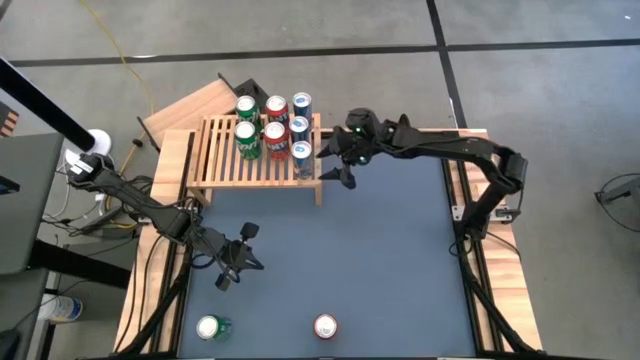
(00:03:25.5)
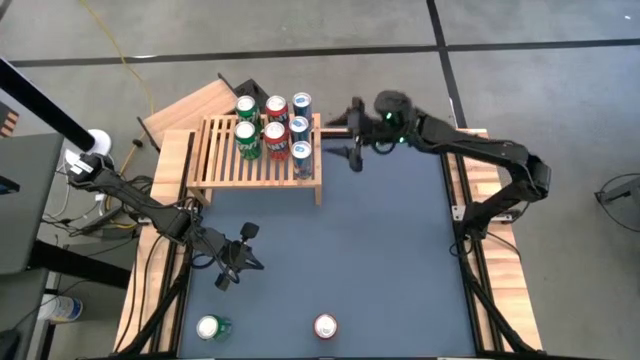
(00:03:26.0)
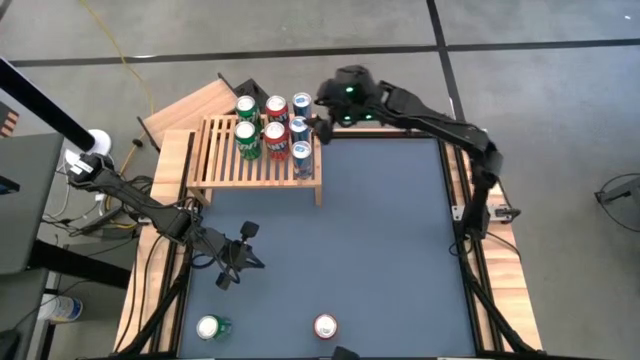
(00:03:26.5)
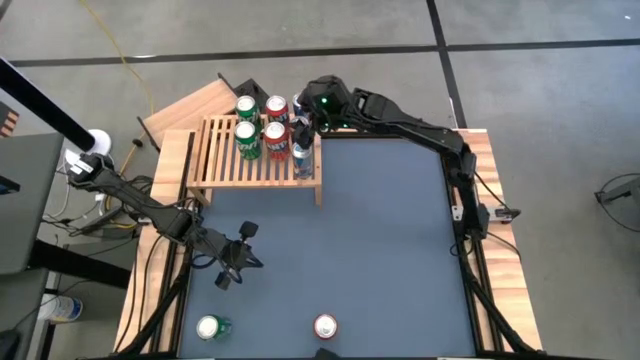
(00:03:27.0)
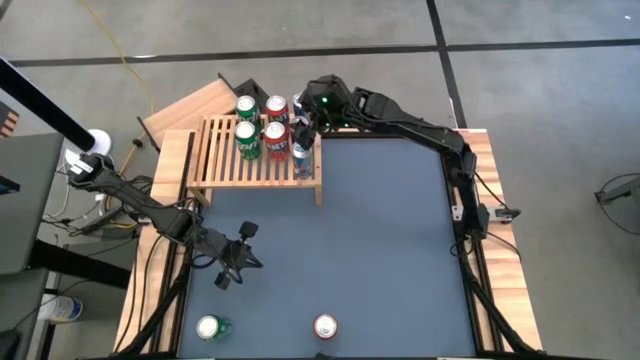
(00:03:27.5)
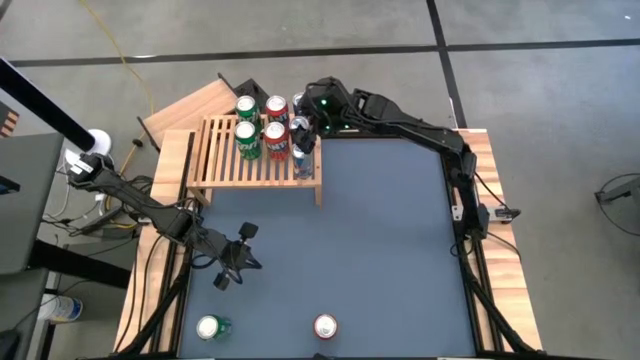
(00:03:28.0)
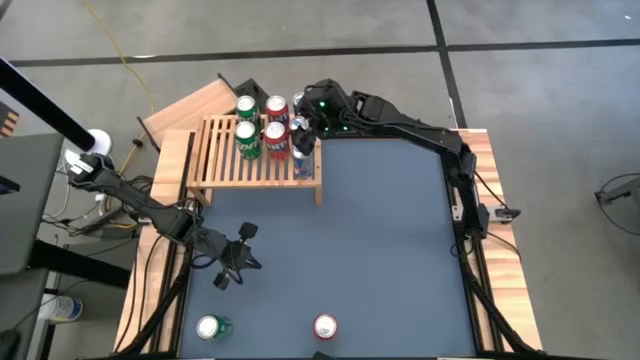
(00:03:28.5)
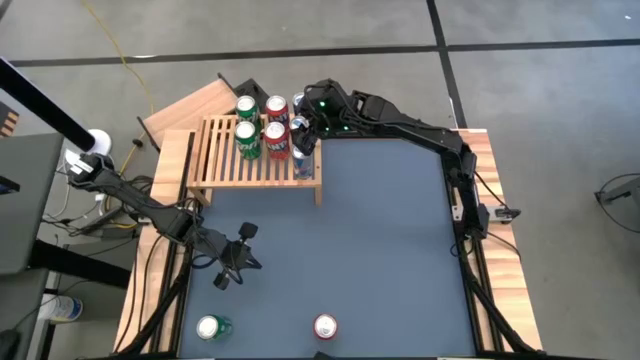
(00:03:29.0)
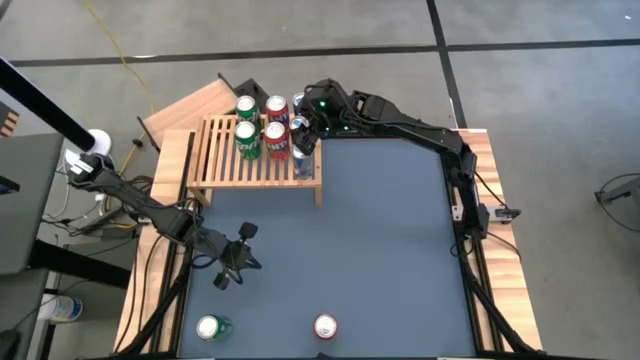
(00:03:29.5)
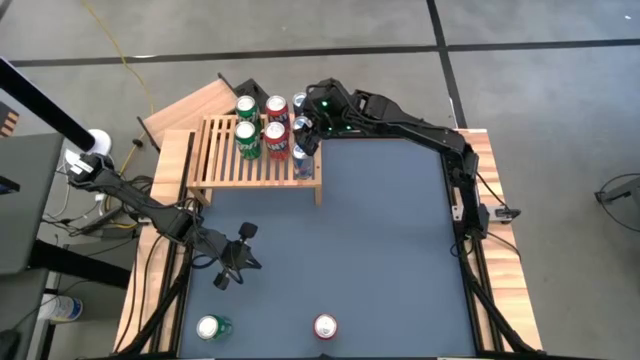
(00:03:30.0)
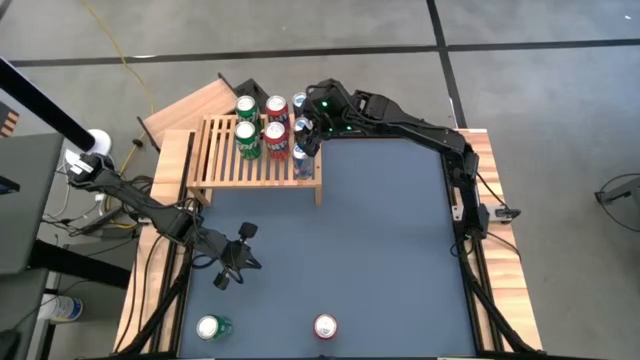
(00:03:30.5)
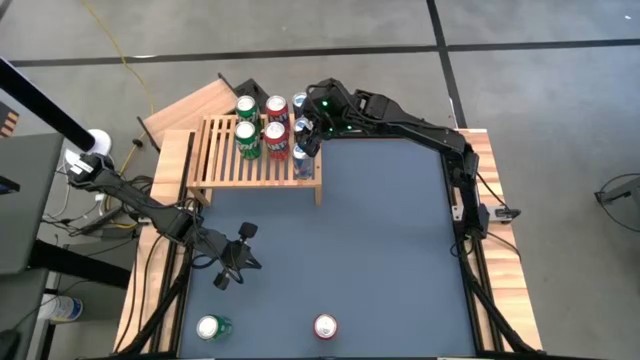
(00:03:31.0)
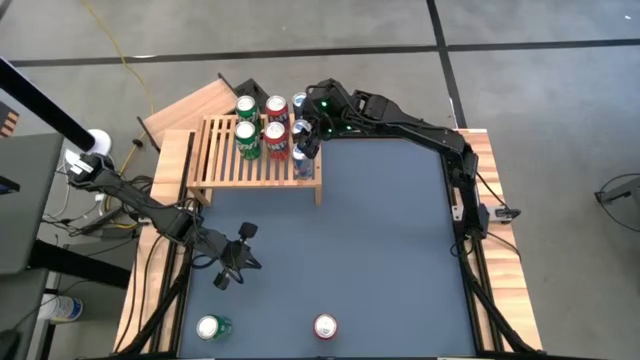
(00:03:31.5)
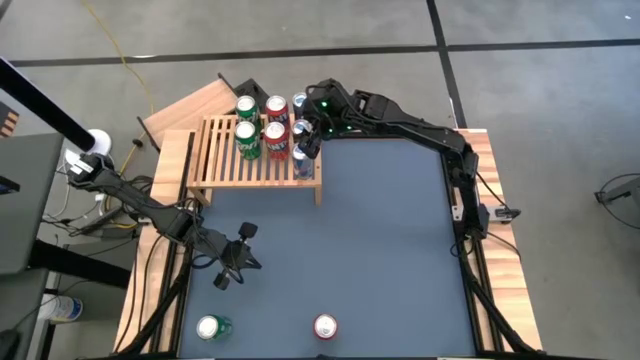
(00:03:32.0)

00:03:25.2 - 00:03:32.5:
Task: Place canned beverage on shelf
Adjust the blue soda can on the shelf

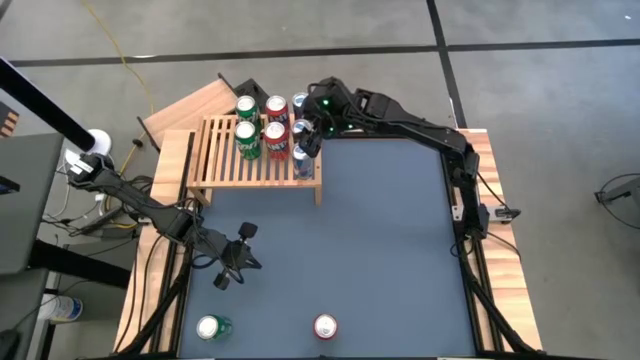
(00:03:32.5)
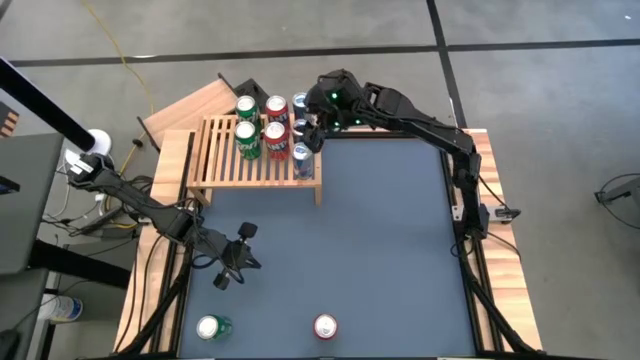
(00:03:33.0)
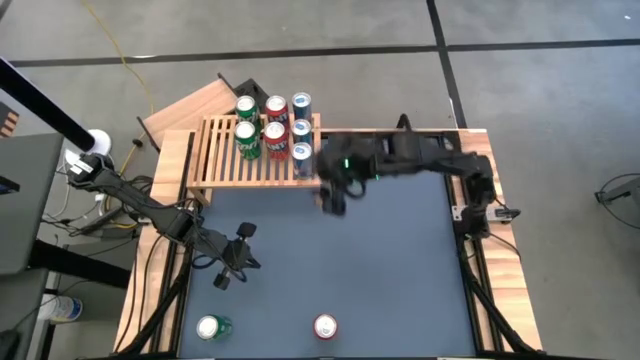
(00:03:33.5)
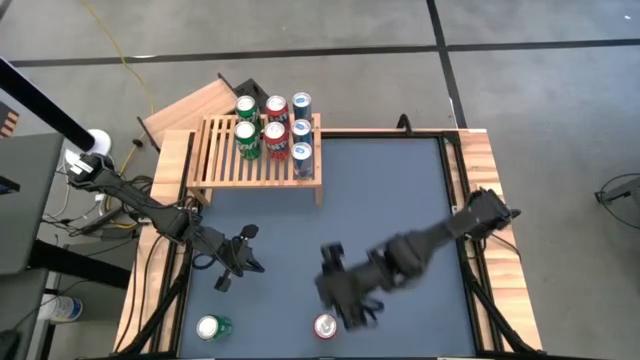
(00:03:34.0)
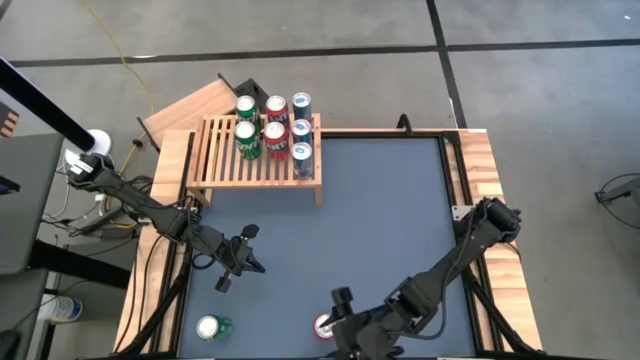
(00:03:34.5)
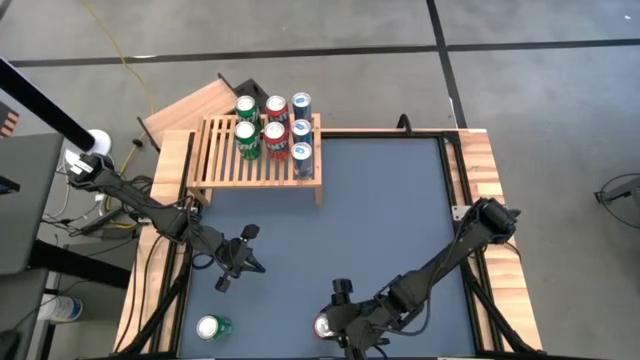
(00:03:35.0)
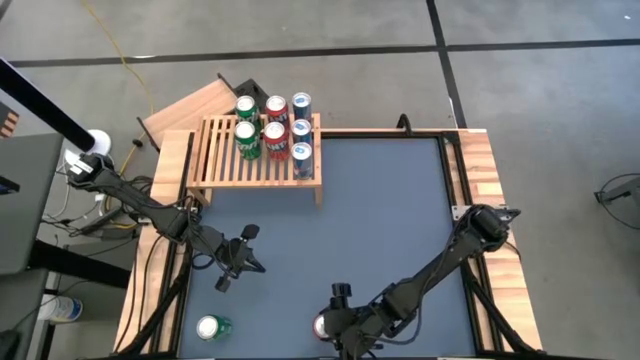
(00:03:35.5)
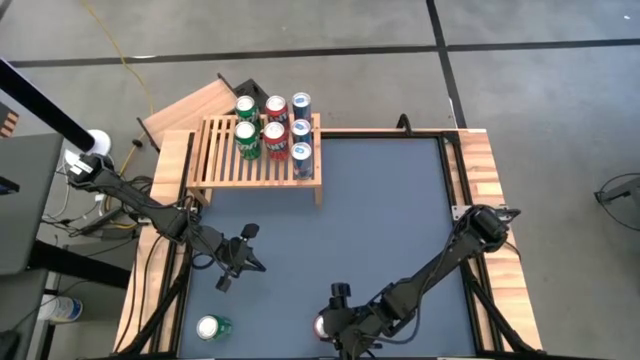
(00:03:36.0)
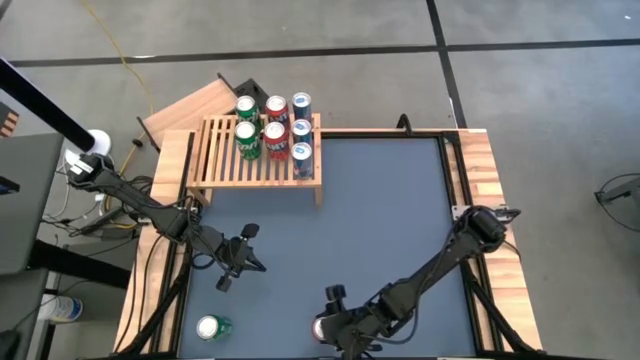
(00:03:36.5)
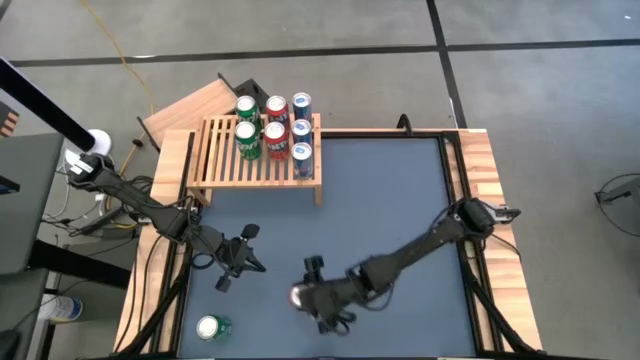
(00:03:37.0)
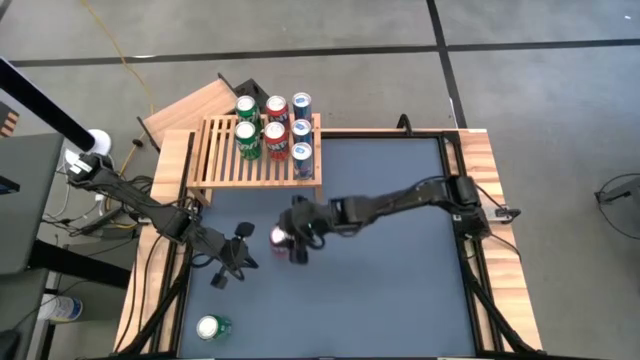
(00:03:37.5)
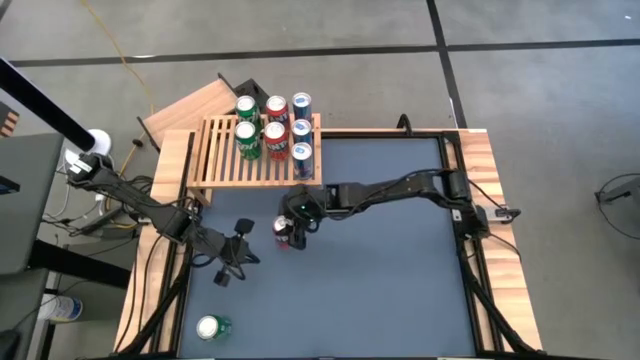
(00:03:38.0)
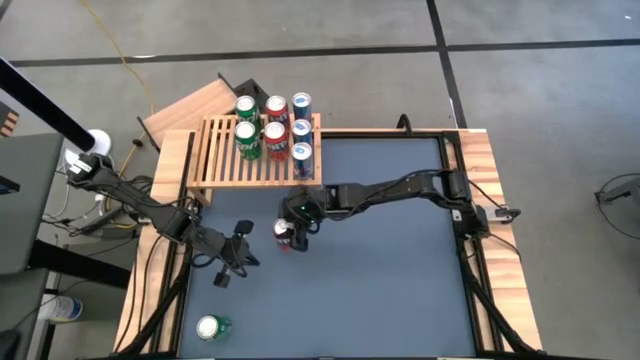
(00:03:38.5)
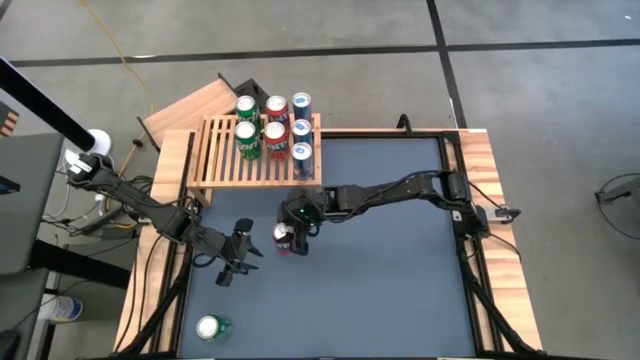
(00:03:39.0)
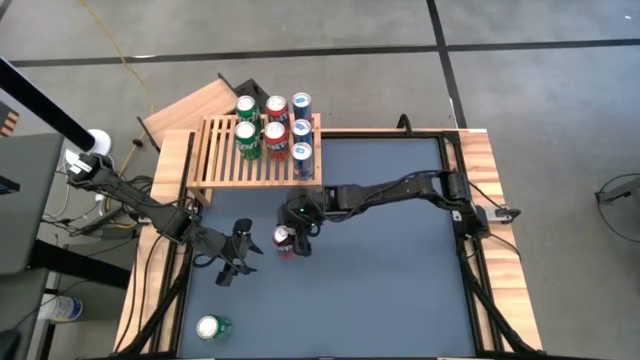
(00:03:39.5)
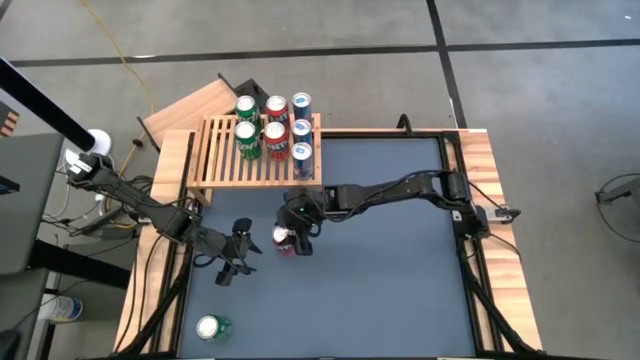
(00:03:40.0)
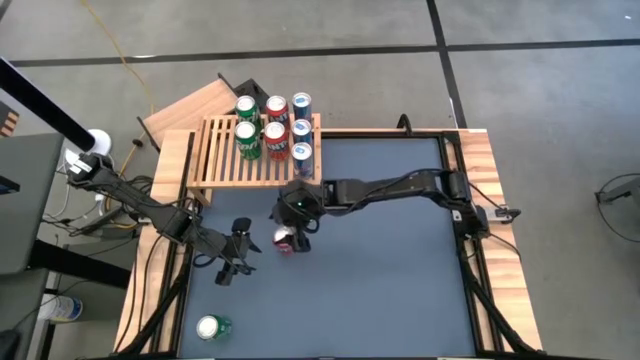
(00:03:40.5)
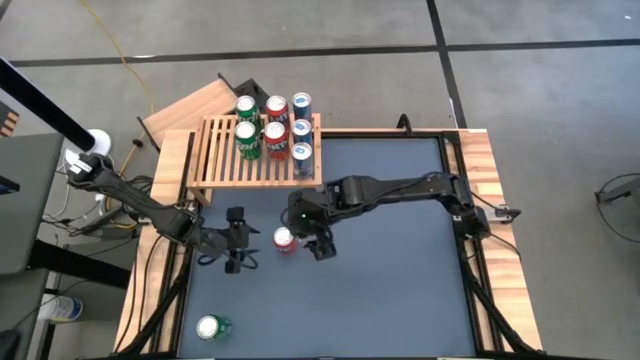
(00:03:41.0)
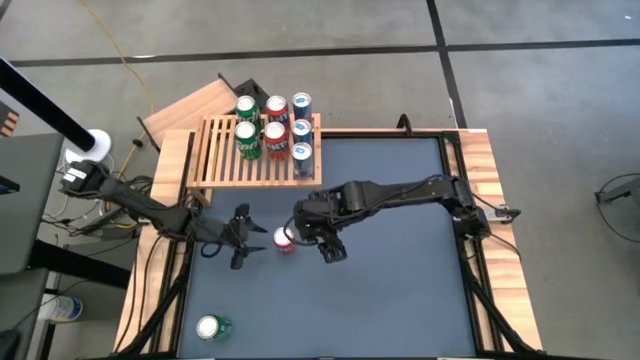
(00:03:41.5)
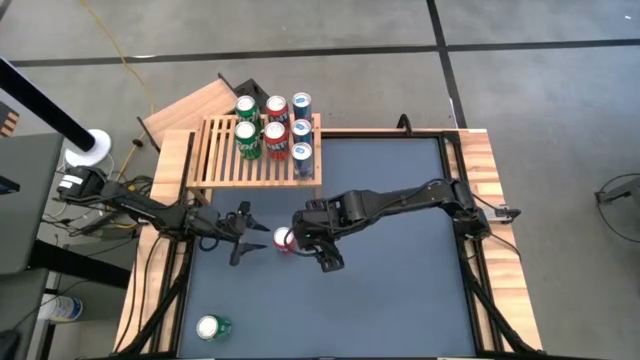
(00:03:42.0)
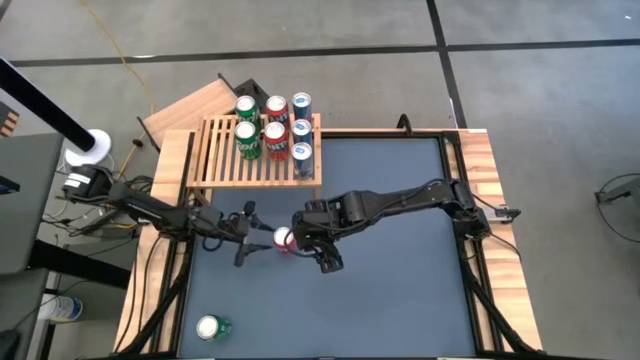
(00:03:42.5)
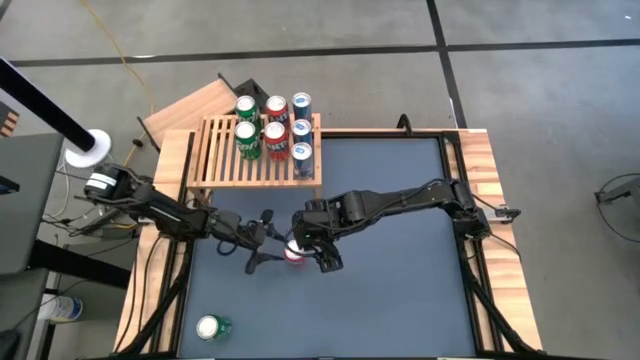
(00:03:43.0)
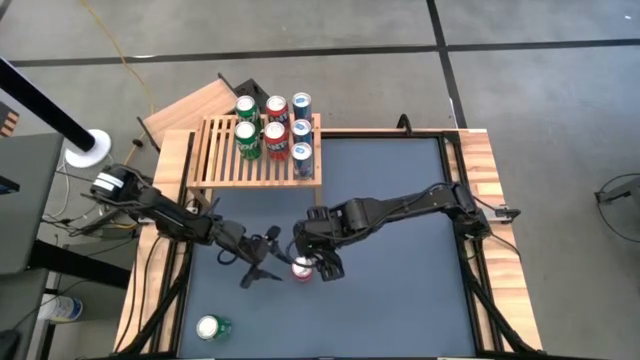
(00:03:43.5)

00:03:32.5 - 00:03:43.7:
Put the red soda can on the shelf aligned with the other red soda cans
